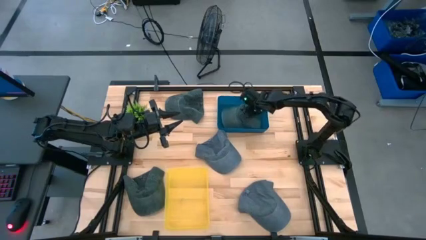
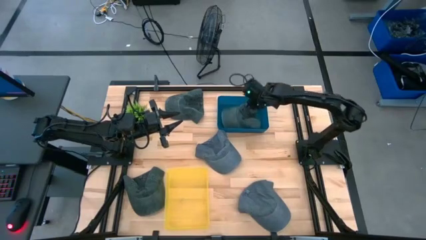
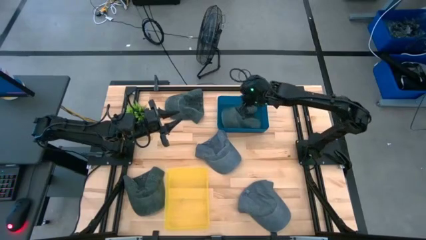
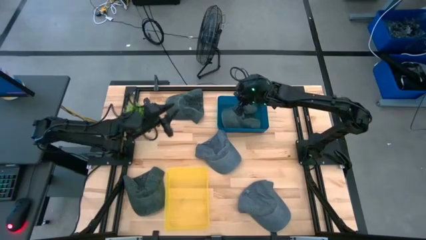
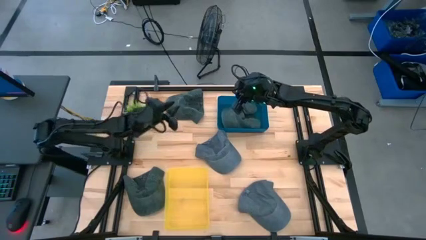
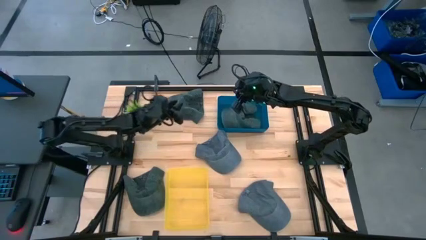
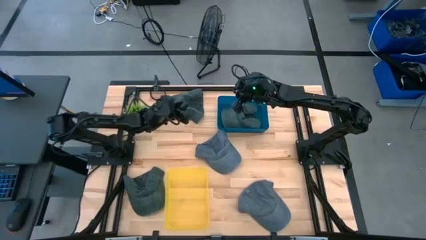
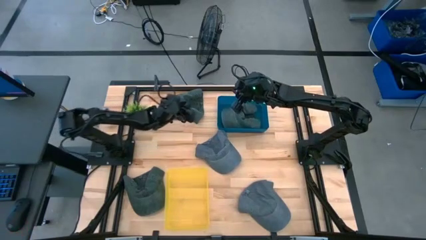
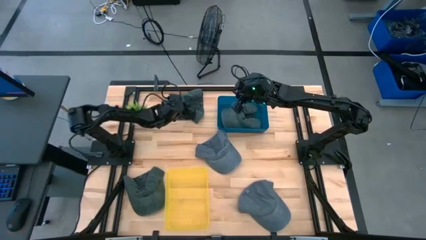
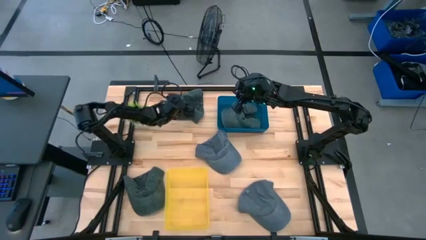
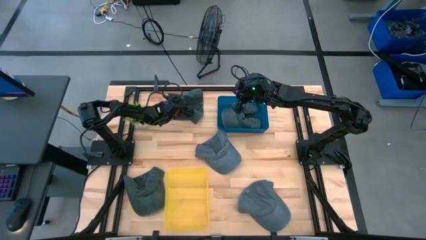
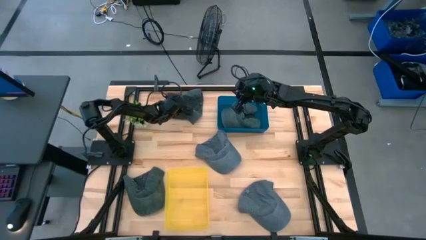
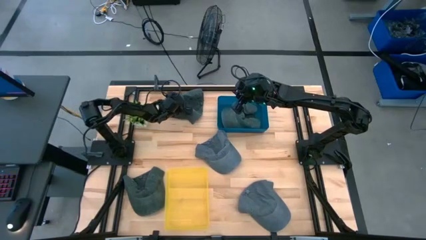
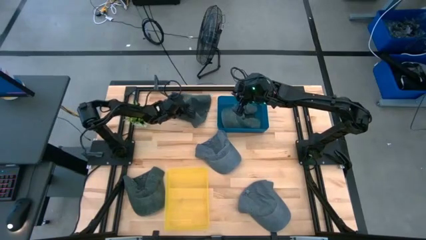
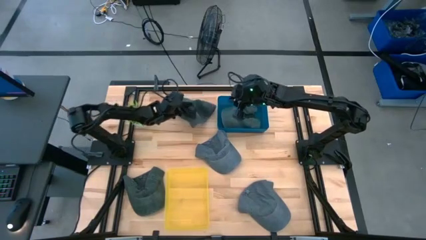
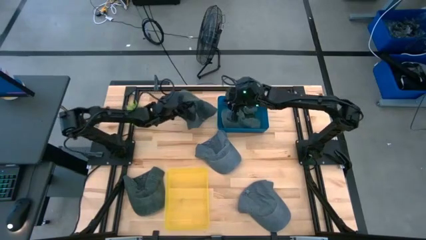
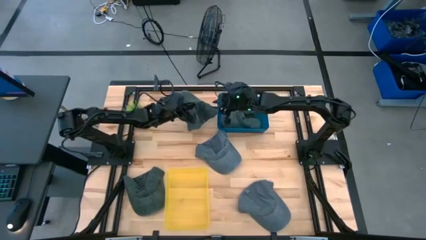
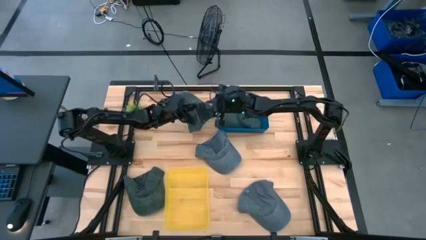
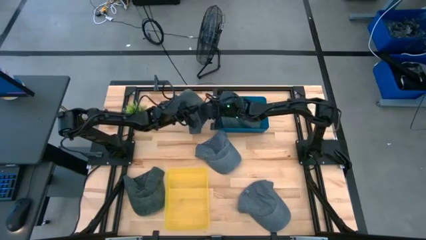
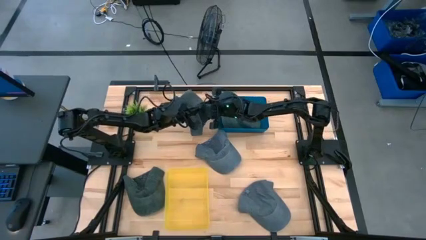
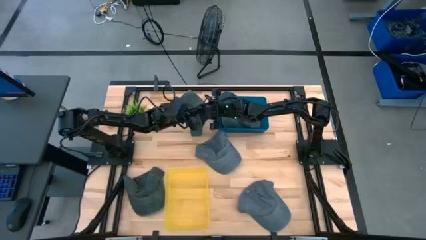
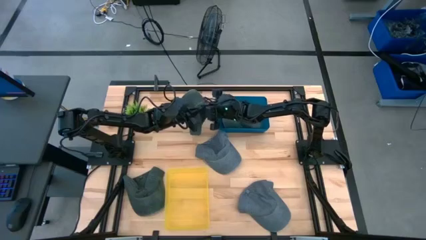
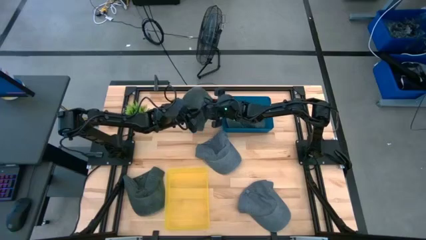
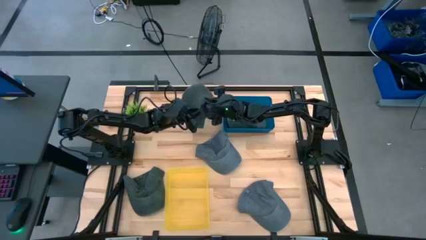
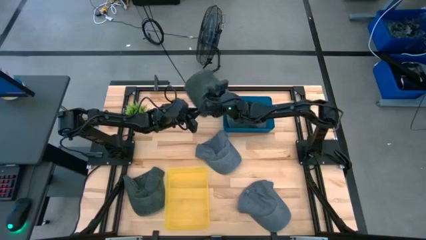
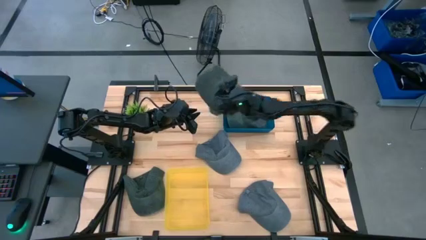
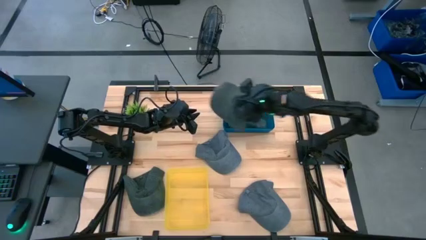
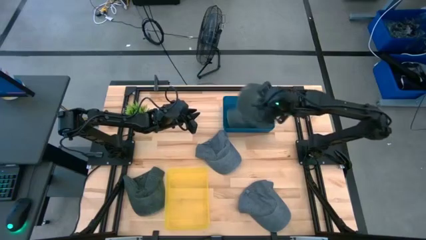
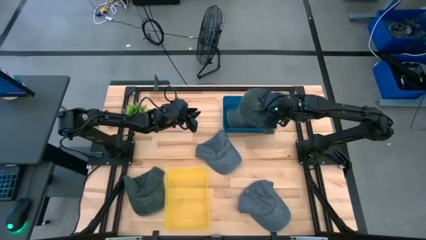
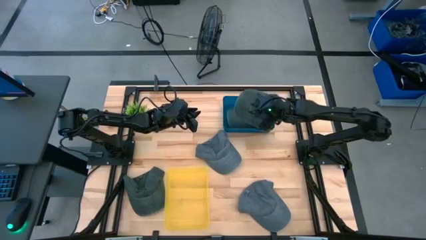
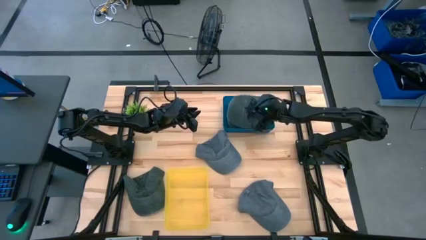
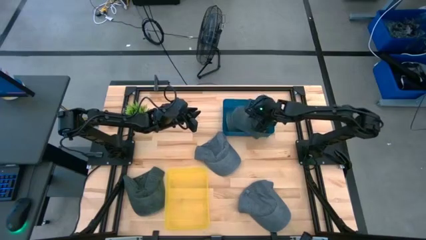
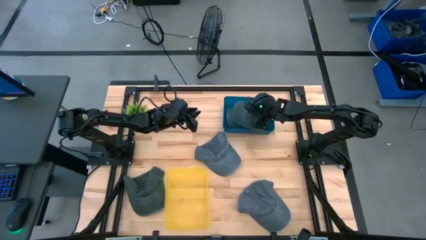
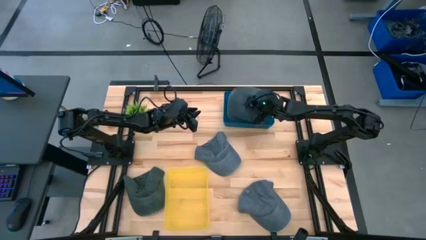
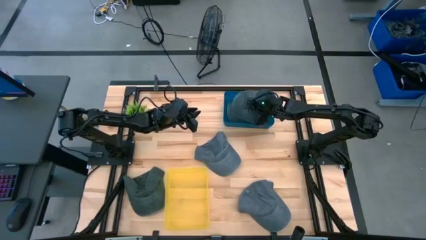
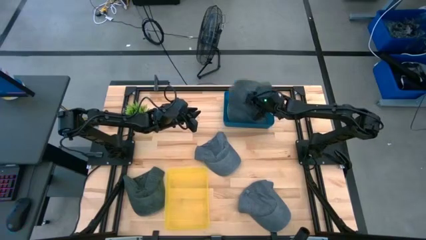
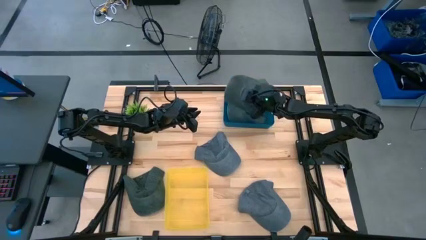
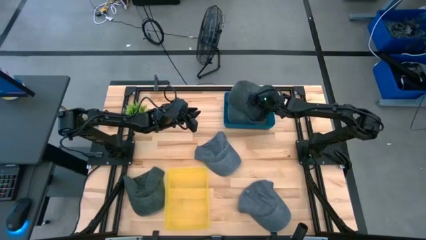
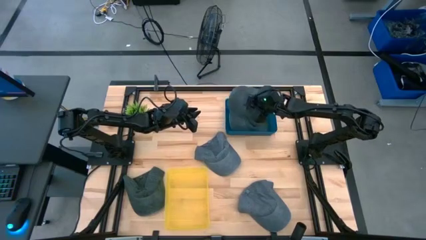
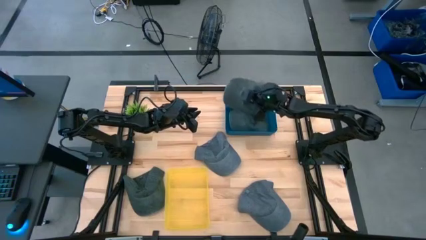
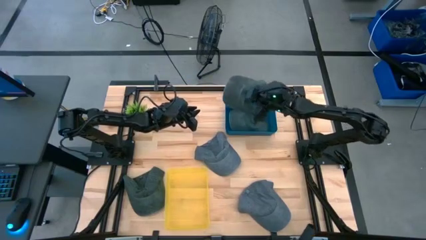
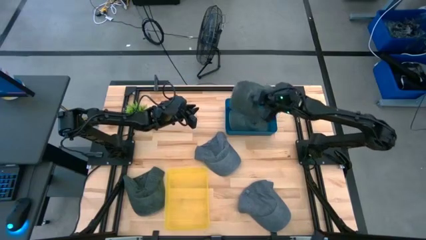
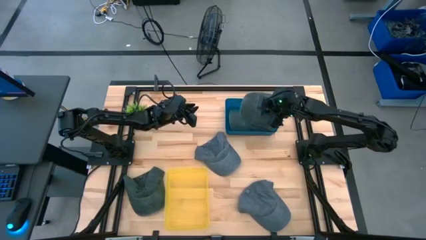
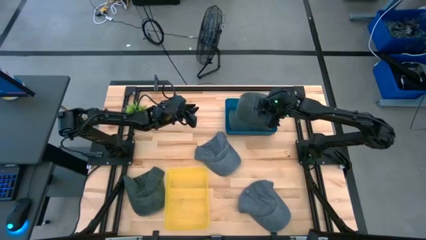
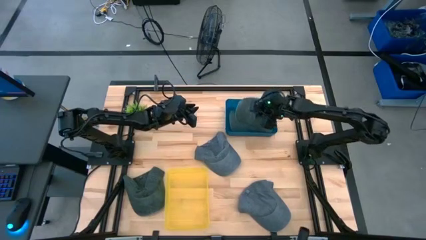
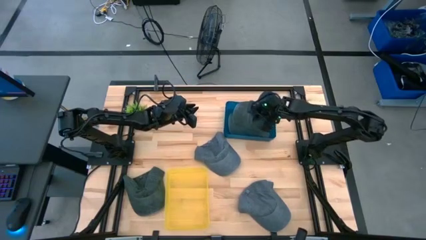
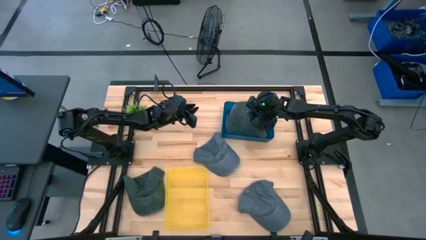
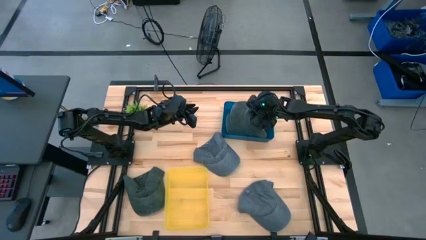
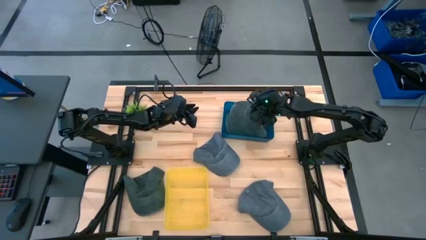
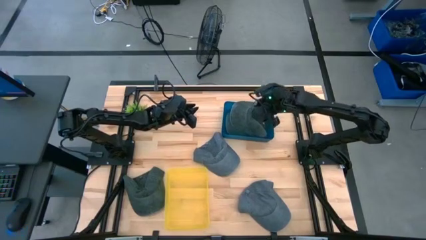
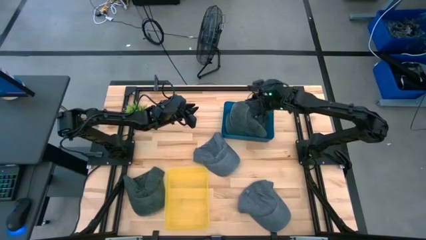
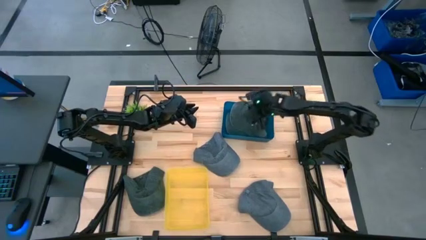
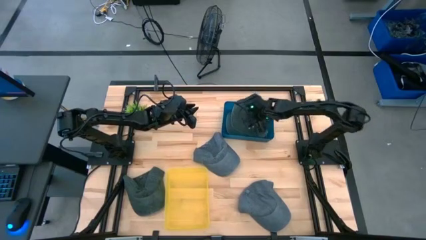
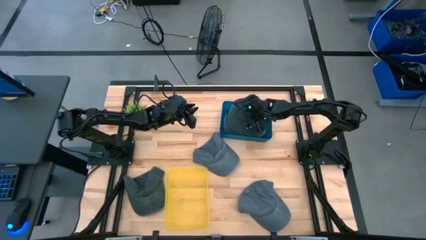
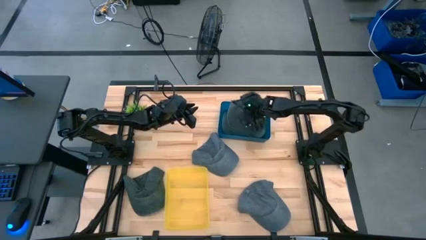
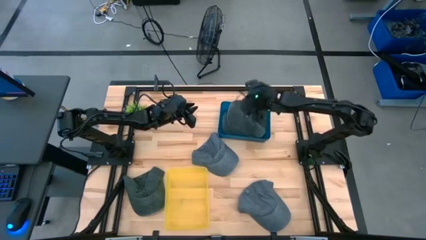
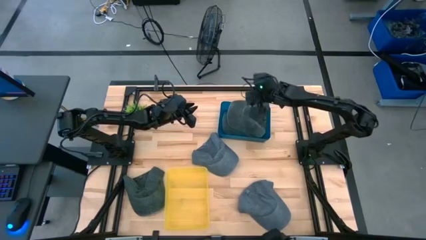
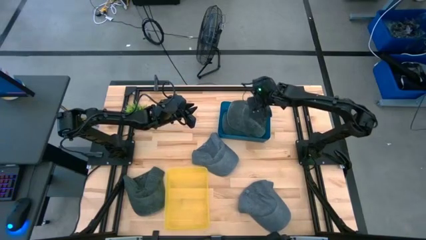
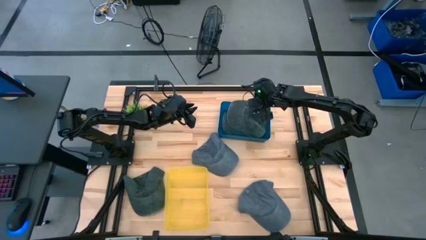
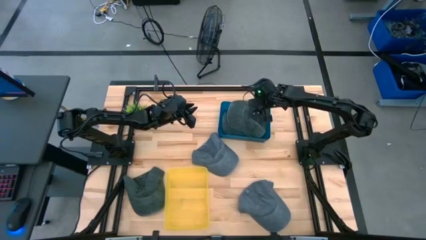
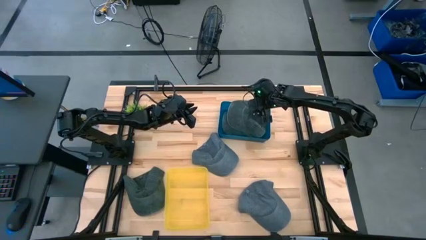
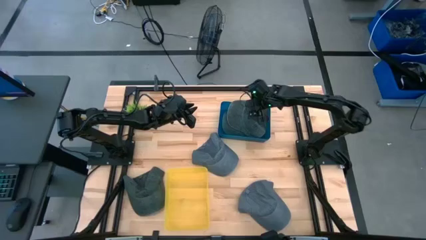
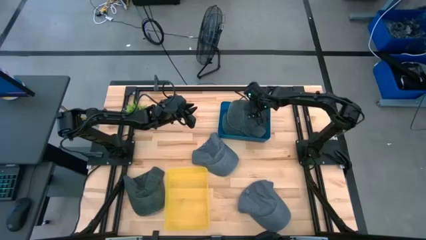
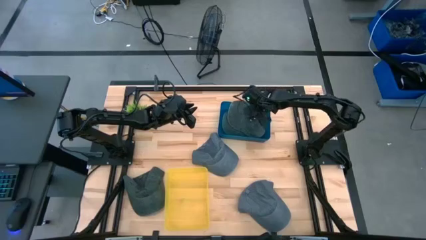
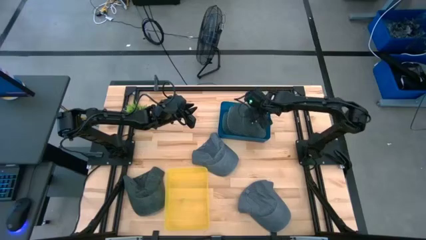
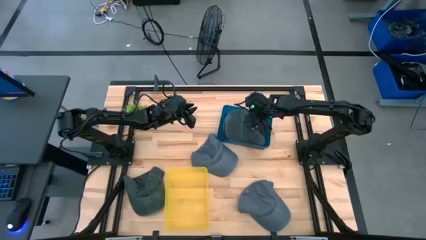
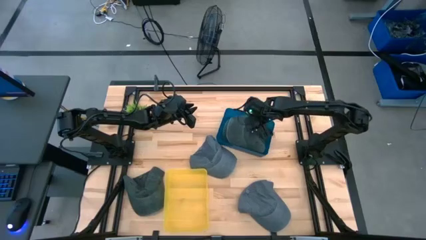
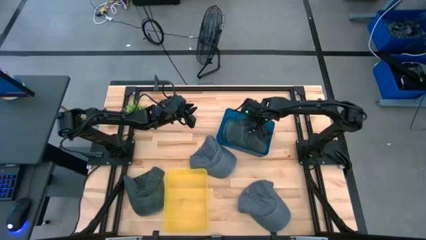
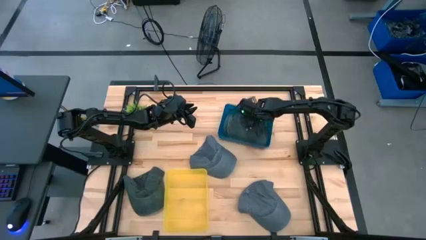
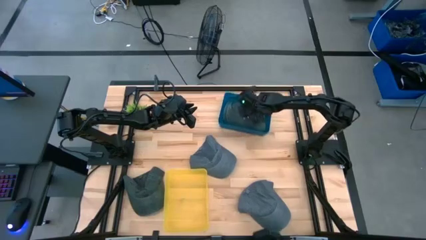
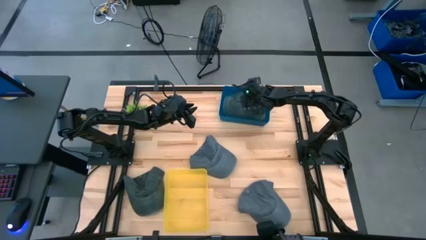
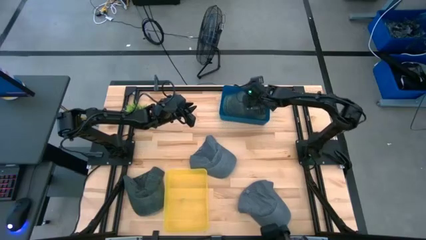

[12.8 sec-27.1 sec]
Task: Pick & Place hat
Put the top dark gray cap into the blue bin
